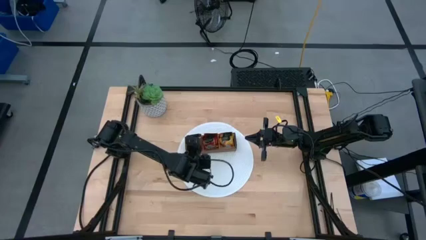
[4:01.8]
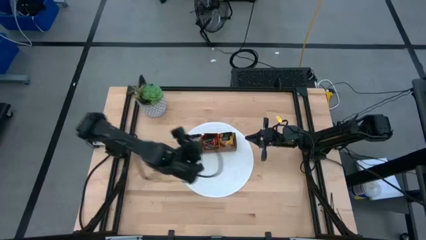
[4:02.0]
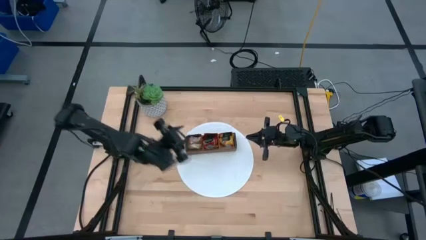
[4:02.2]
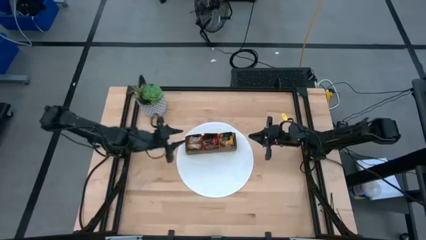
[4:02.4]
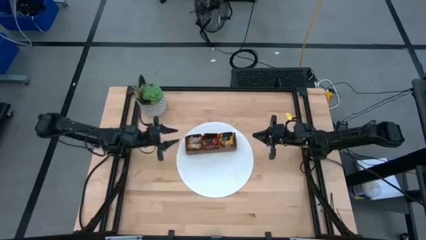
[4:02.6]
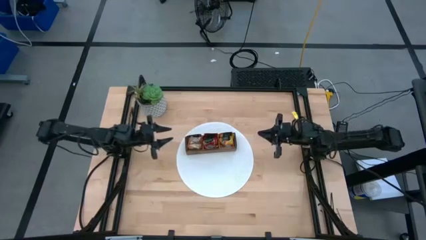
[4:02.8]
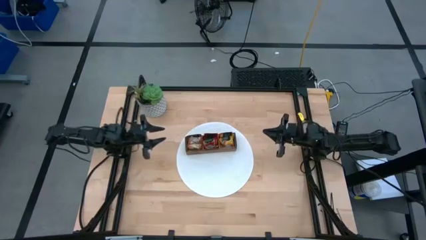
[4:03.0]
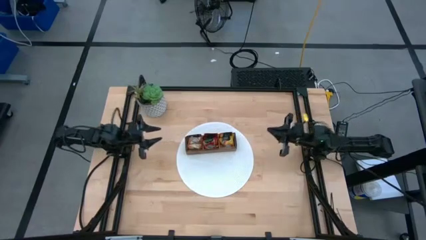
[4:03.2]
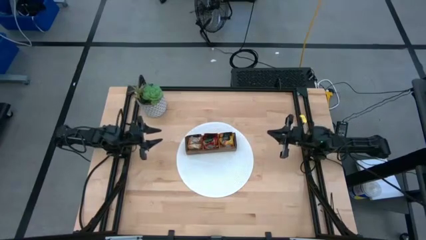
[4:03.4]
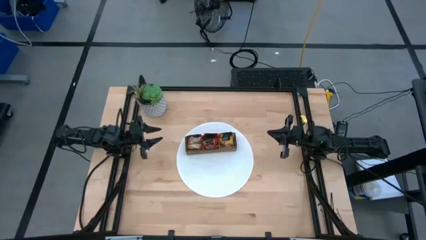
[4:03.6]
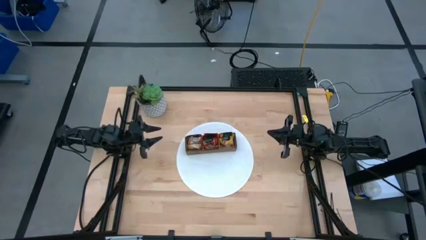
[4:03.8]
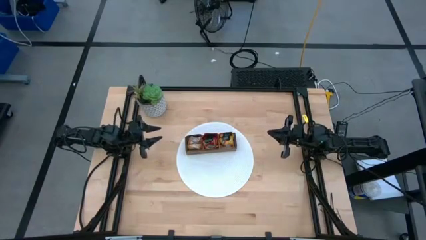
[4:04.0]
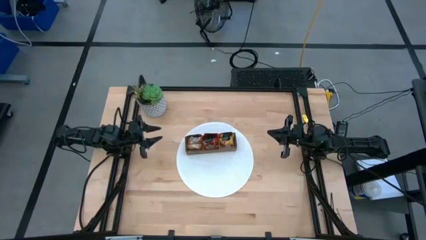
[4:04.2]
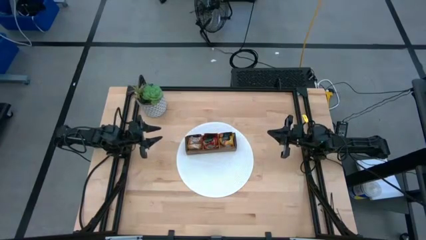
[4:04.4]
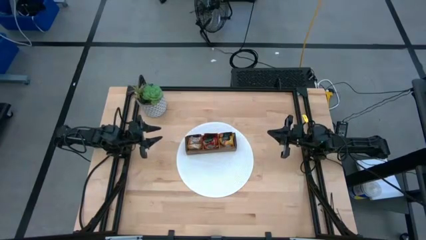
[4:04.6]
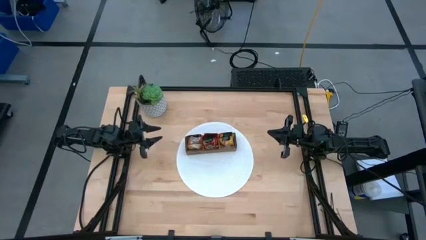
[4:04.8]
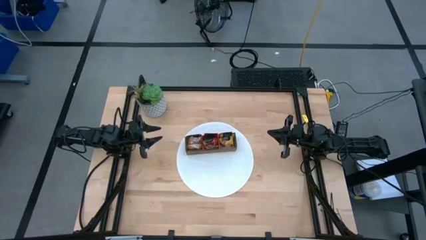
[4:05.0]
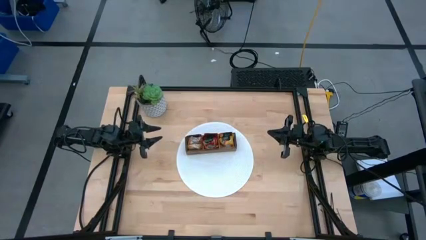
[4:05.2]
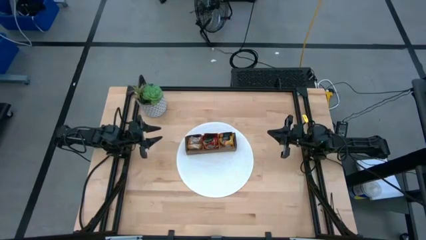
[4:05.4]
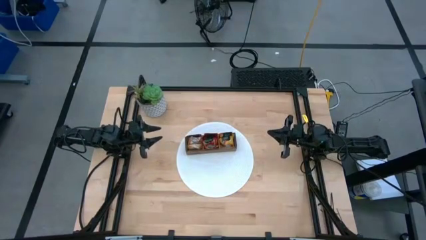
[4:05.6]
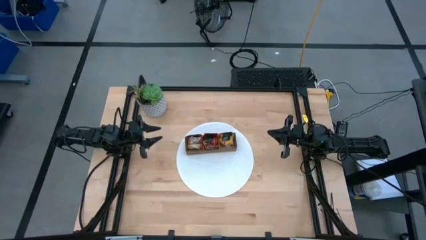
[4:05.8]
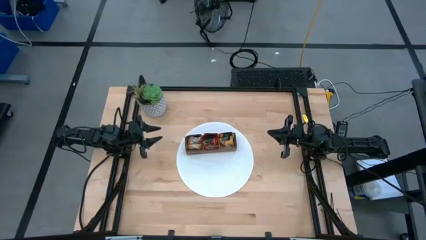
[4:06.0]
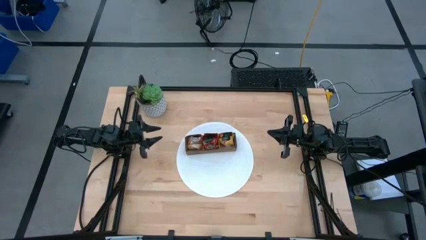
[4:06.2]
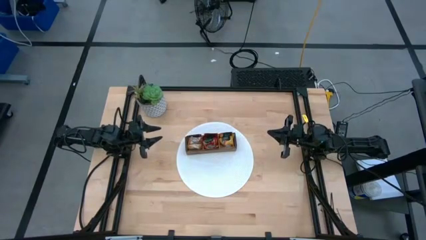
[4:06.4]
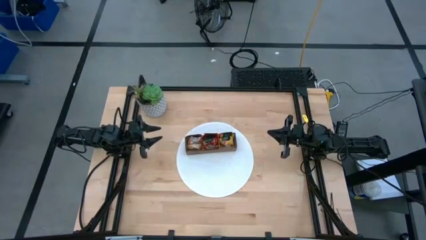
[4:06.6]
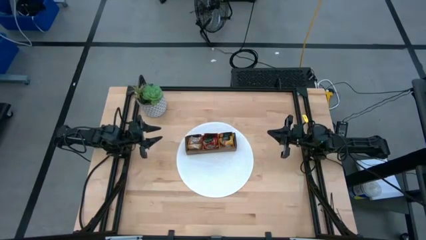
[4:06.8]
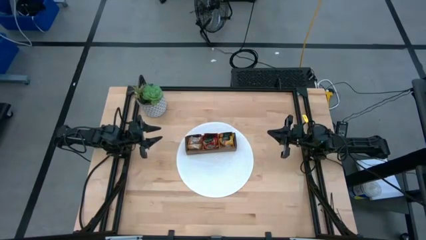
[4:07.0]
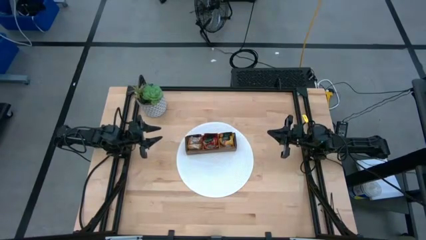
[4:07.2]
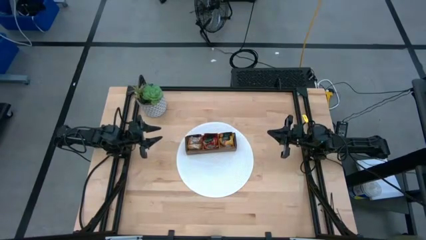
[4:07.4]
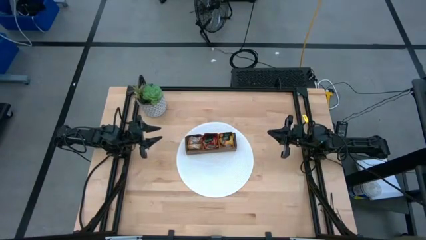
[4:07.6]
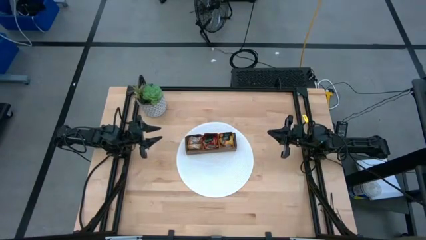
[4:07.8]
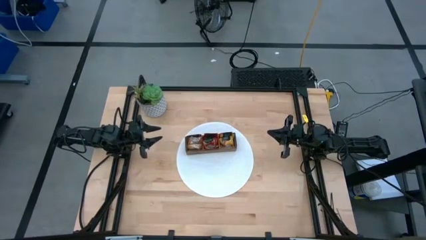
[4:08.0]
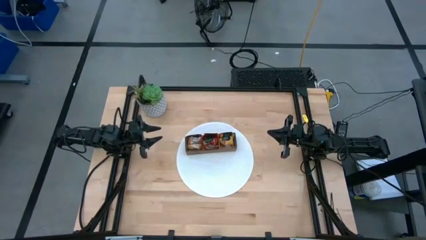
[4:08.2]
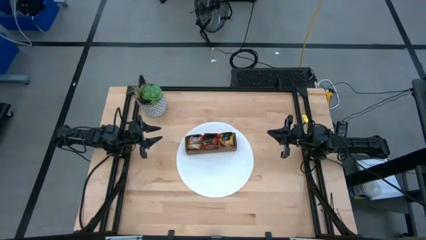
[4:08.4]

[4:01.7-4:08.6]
Task: Pick & Place Tea
Return to Home Position

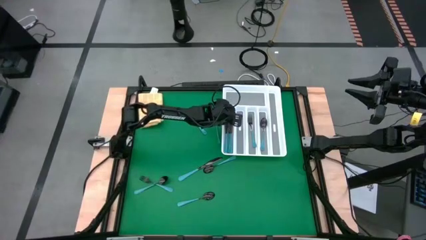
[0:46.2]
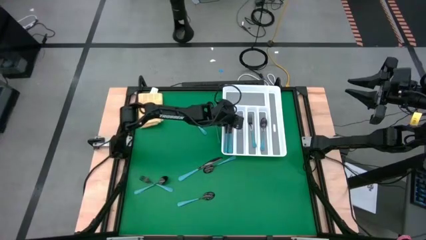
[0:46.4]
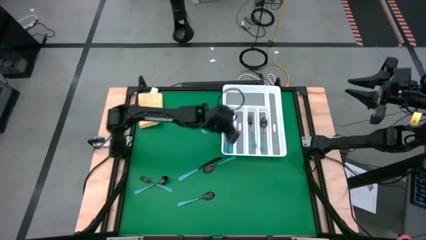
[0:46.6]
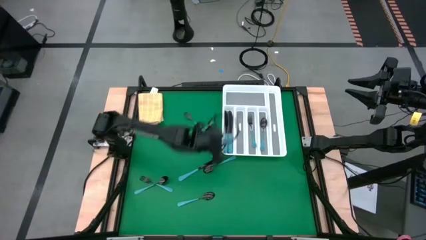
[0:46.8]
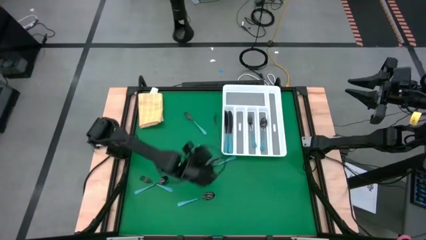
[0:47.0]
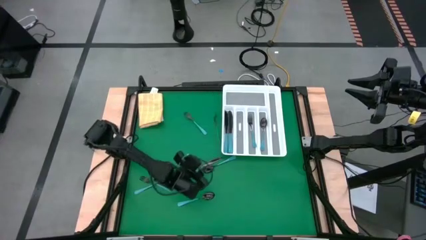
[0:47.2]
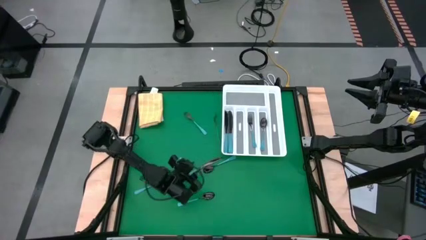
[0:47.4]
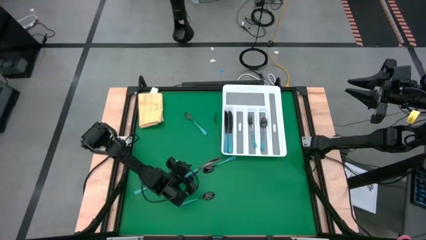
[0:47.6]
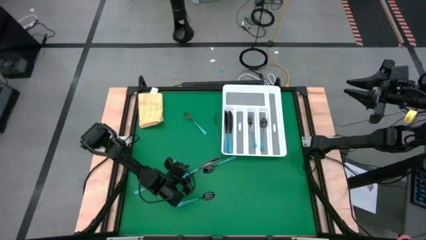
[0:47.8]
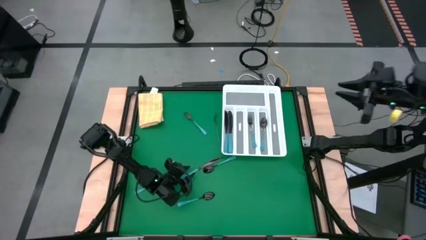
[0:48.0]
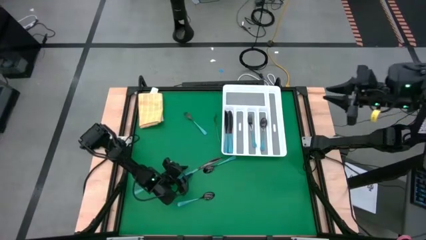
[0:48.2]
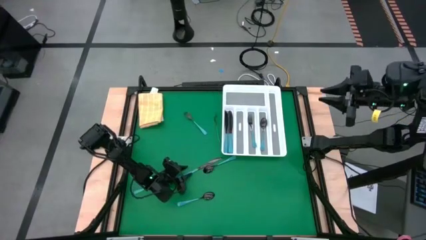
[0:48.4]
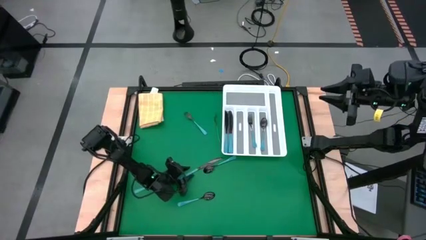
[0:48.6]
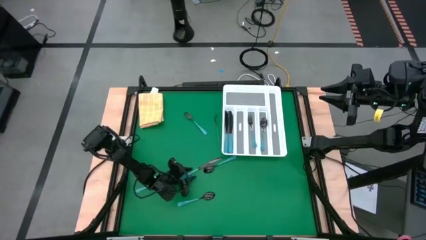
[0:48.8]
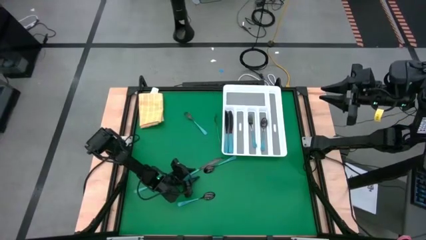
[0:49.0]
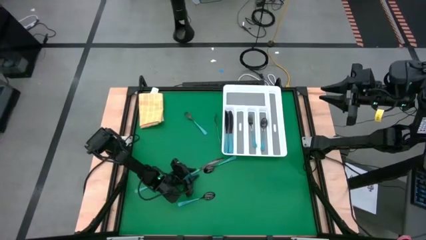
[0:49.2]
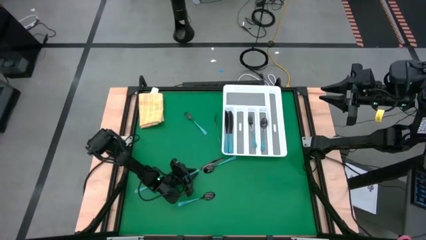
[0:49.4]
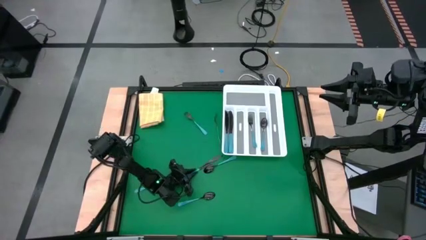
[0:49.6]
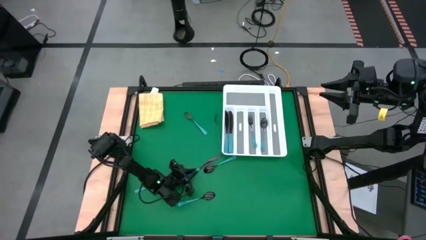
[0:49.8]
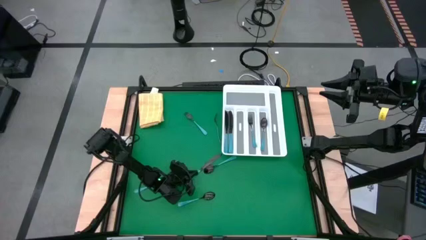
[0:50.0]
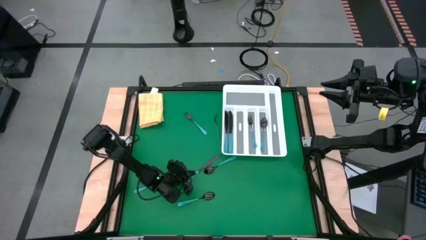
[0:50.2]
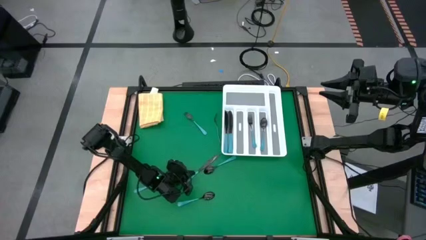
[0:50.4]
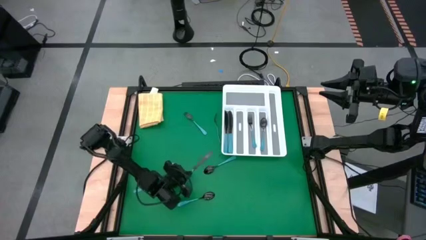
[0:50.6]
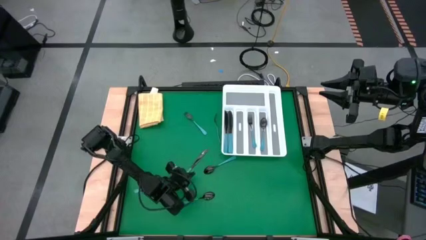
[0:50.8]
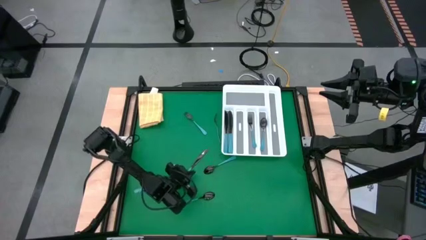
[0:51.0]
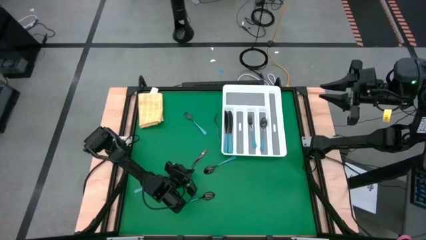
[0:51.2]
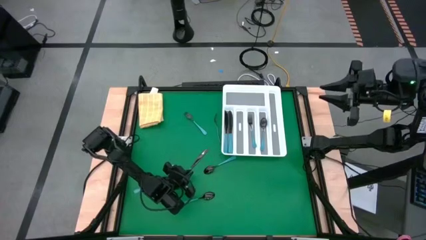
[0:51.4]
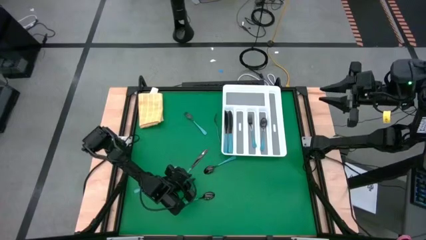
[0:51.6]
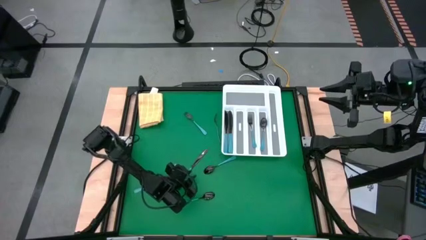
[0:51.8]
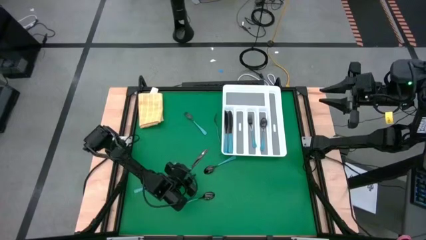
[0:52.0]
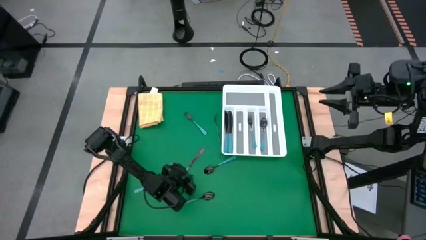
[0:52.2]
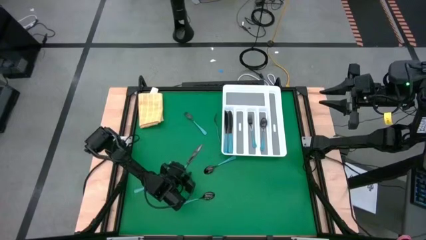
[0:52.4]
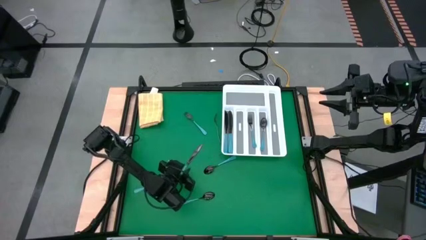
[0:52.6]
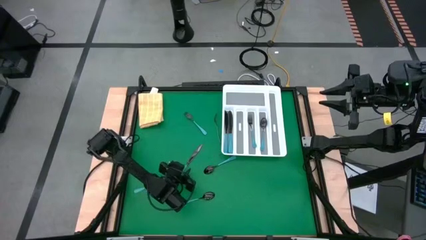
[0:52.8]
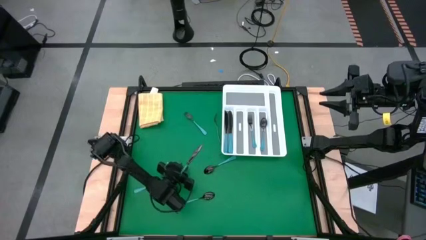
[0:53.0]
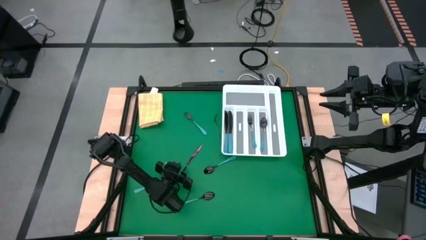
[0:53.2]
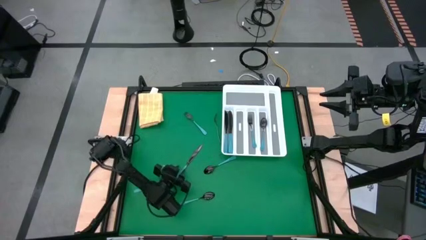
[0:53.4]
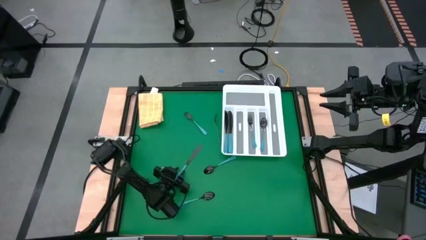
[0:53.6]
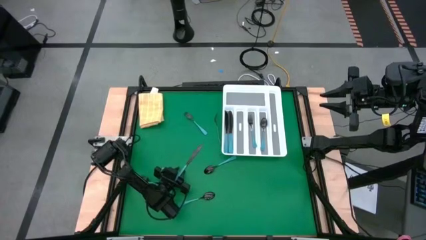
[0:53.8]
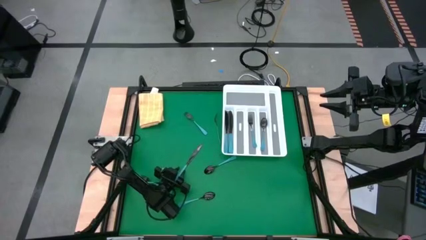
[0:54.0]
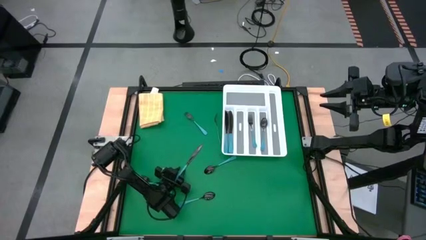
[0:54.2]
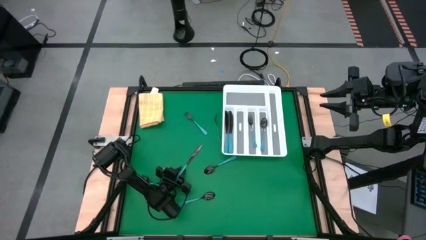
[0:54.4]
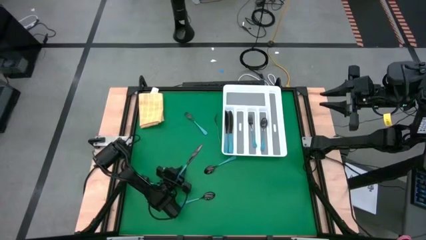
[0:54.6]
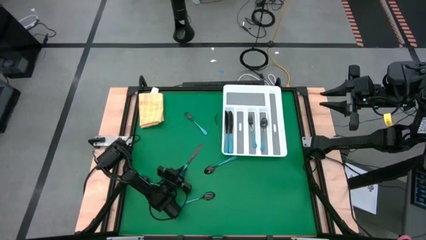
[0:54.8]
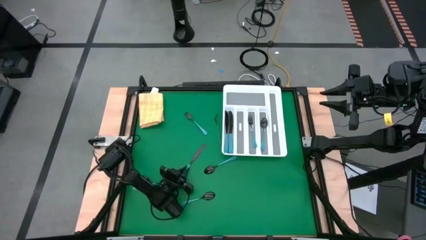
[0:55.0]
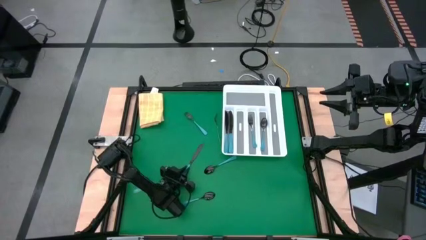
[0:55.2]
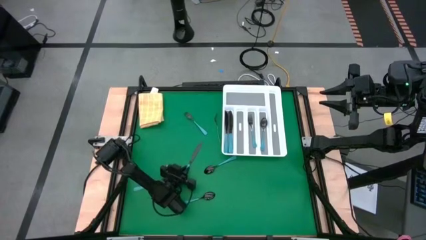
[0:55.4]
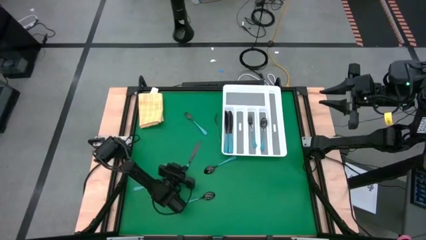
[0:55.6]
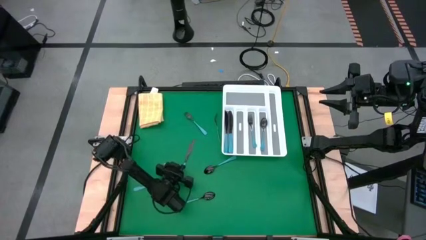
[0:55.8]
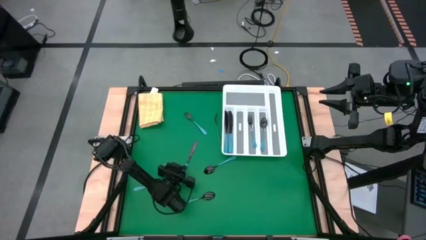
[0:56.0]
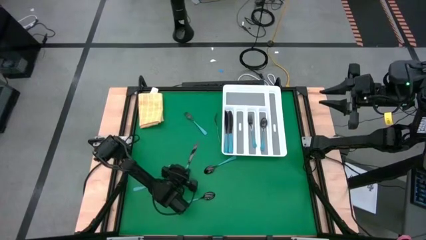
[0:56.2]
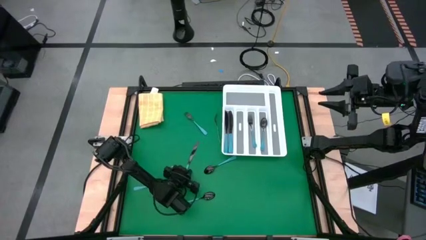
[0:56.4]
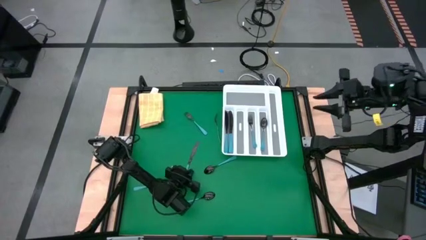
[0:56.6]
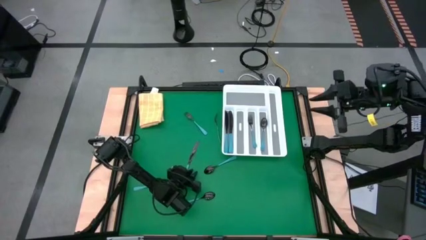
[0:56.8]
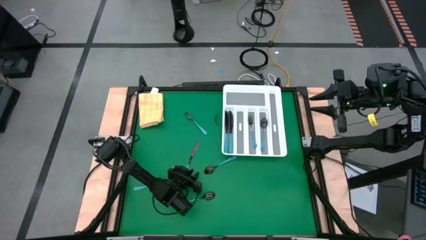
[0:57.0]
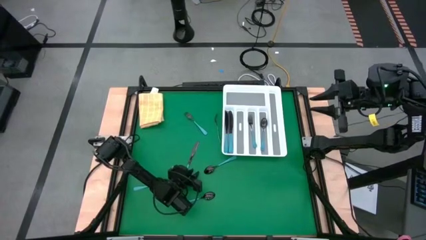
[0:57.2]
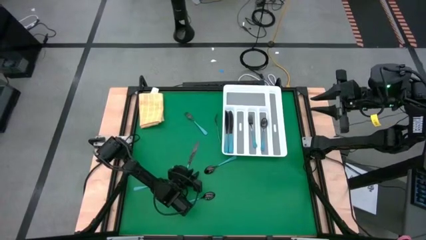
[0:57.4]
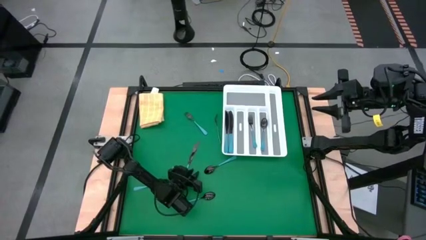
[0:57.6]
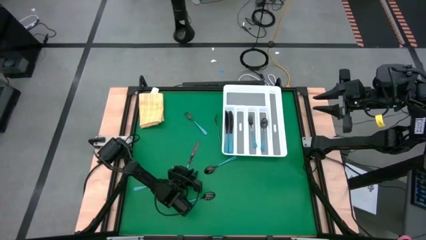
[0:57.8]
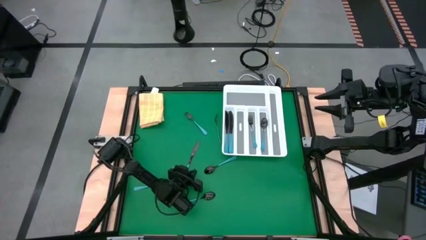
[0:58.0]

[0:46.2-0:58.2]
Task: Sort silverware
Put the blue knife into the white cutlery tray
